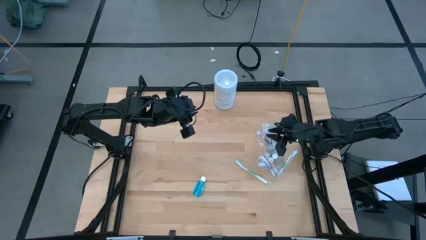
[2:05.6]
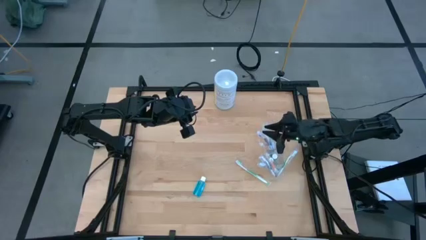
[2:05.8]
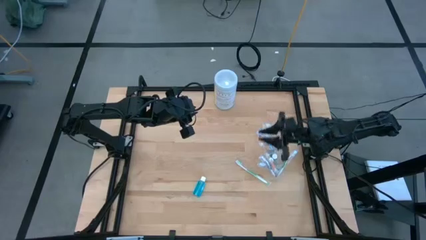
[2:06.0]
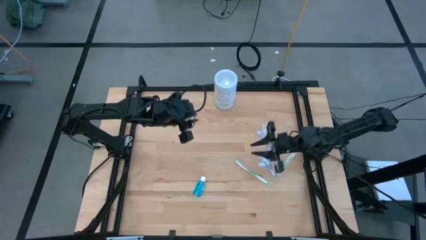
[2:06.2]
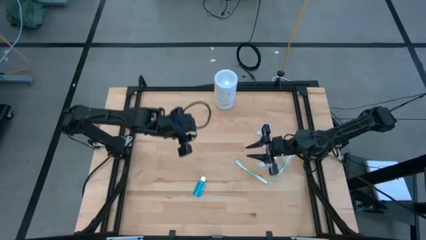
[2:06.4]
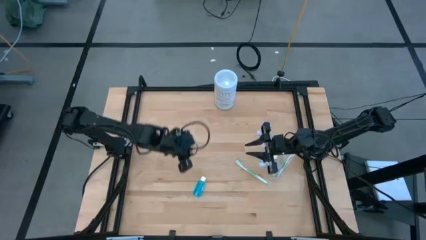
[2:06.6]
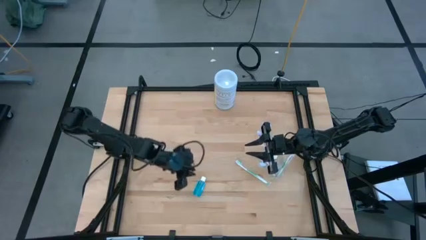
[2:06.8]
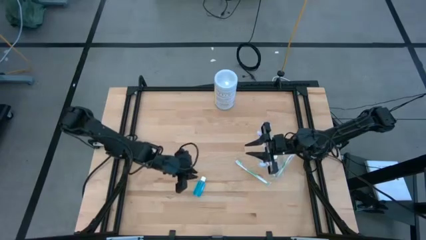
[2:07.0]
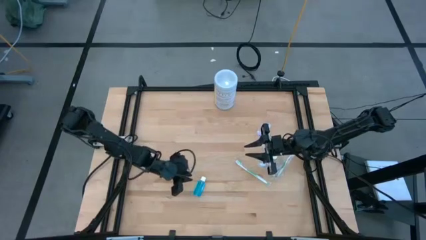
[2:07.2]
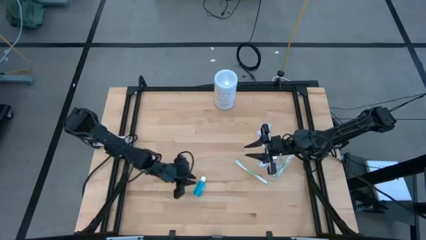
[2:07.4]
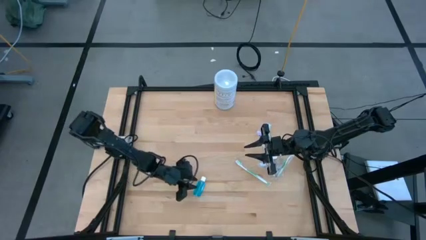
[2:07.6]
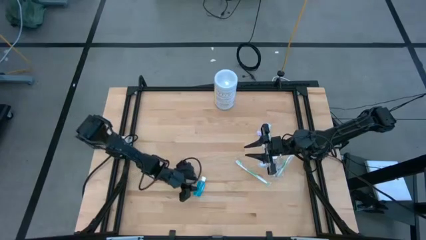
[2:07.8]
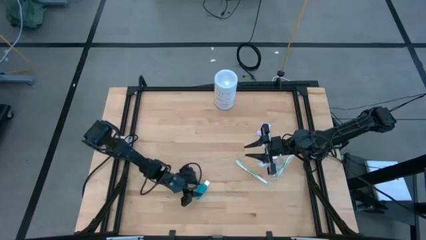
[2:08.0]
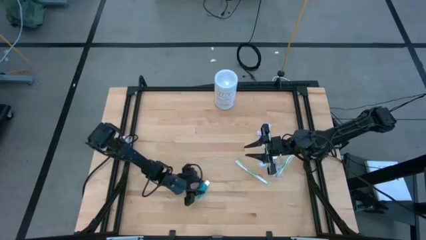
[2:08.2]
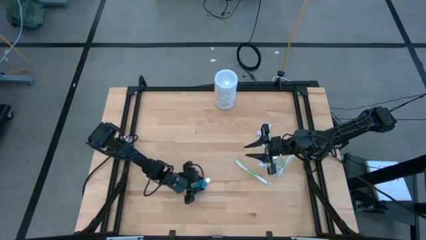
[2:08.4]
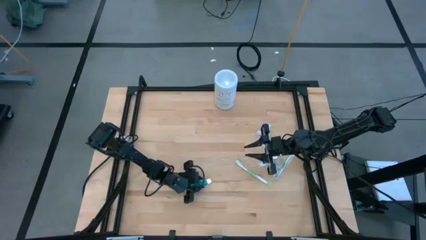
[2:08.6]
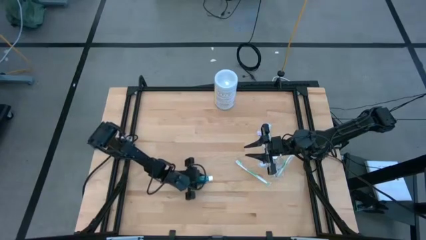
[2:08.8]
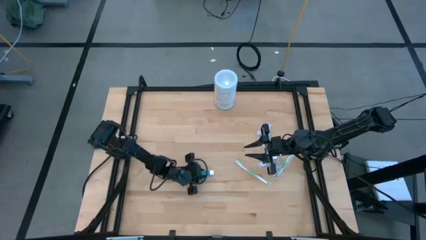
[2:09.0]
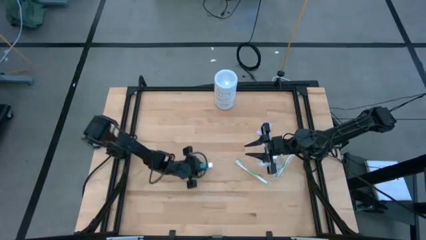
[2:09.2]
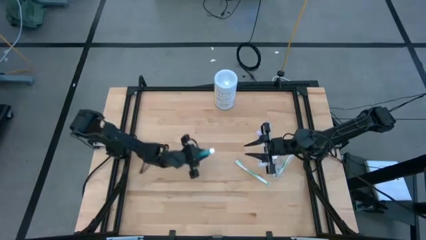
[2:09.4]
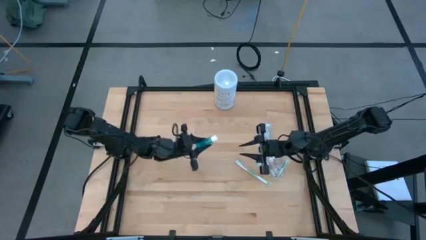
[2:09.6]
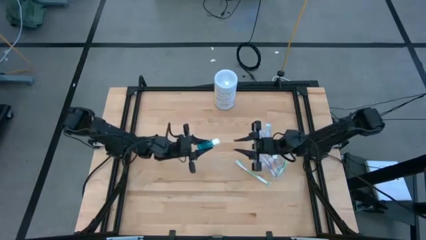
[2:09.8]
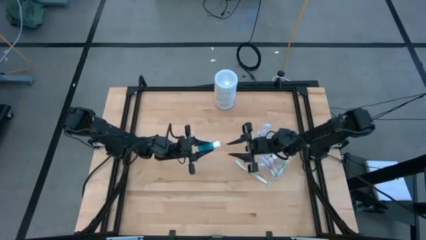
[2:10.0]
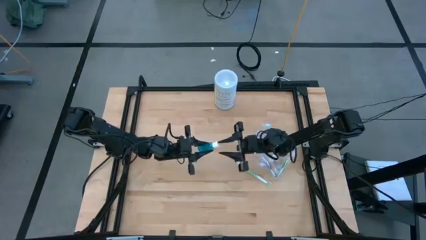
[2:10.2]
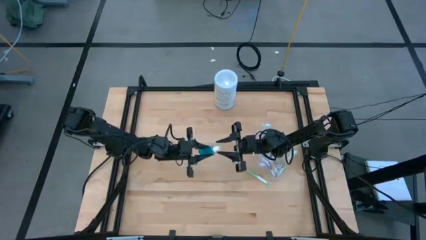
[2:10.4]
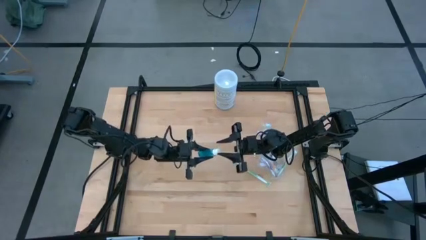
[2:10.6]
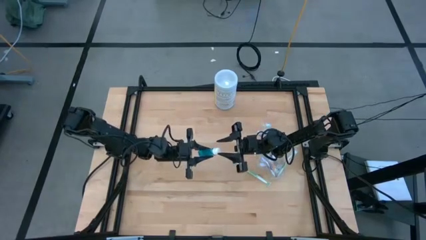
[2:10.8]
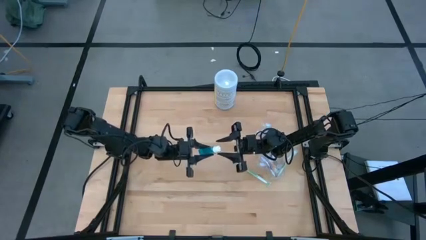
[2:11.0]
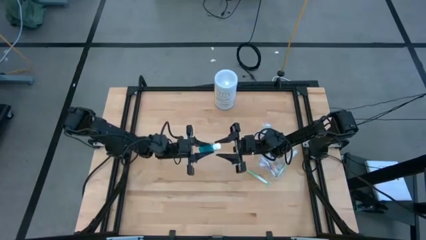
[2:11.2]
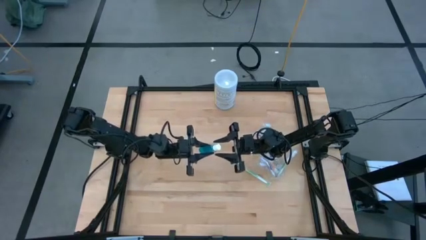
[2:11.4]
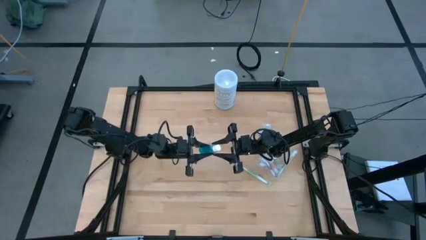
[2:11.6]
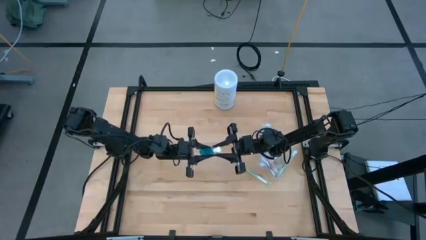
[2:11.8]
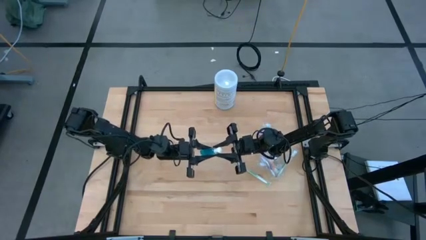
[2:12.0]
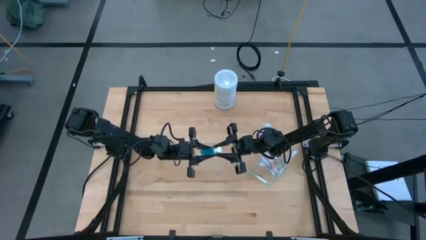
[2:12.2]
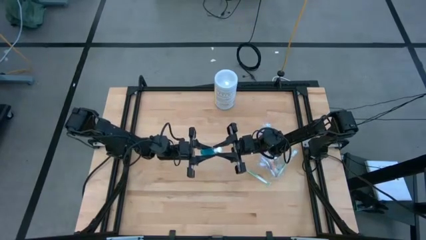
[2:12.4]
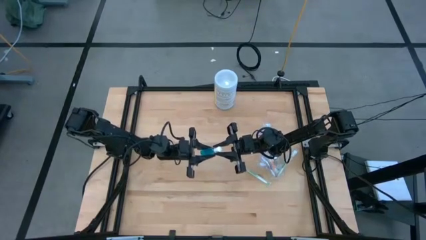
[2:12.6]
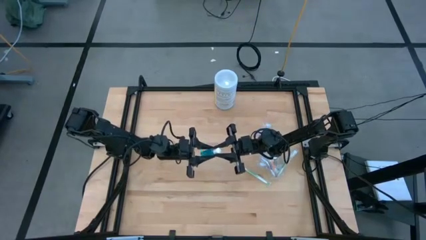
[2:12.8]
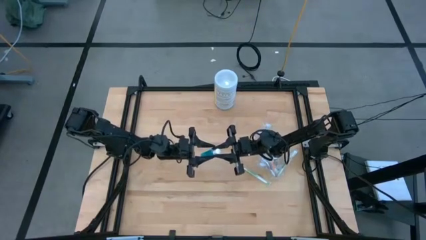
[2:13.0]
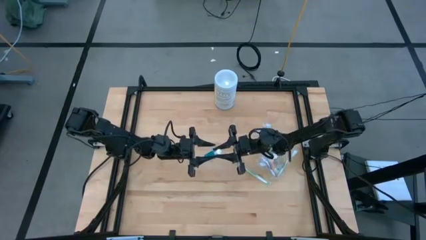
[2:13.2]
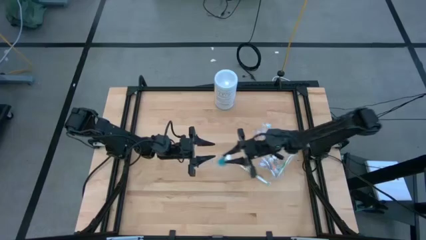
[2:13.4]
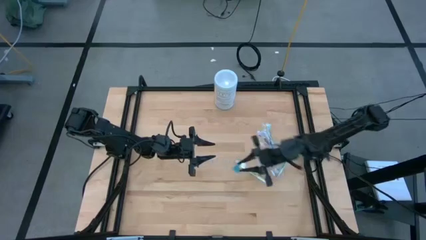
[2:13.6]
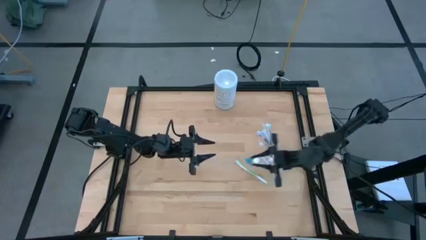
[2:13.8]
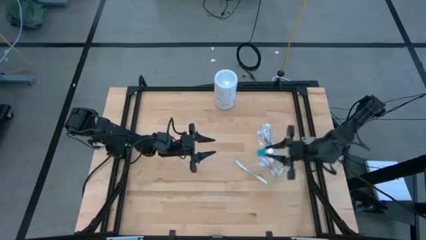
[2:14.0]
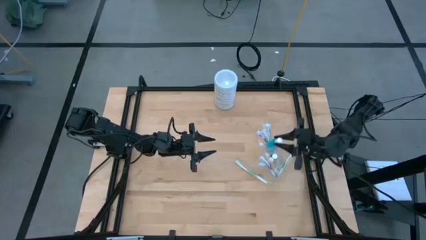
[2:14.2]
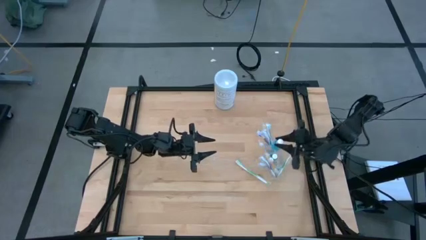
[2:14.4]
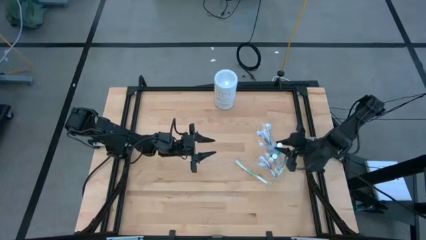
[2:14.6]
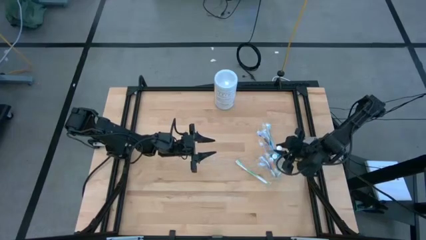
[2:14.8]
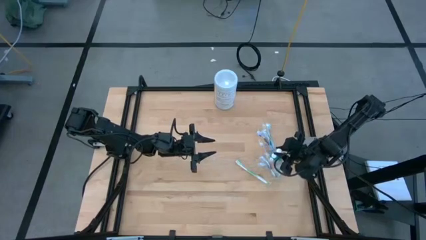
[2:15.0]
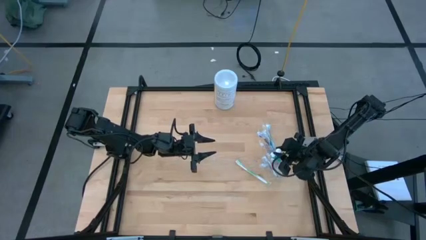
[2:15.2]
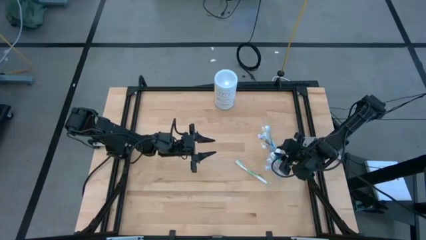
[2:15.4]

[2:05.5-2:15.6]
Task: Pick & Place toothbrushing station
Put the mouthwash into the transparent organizer
